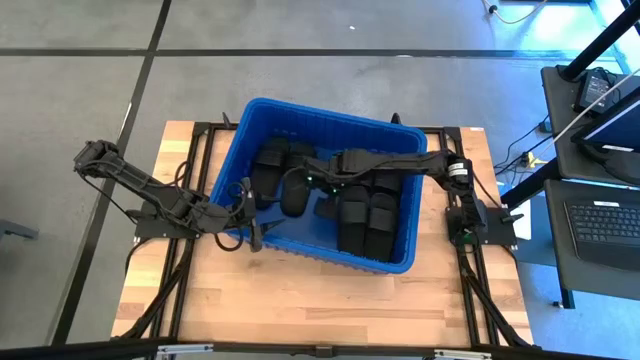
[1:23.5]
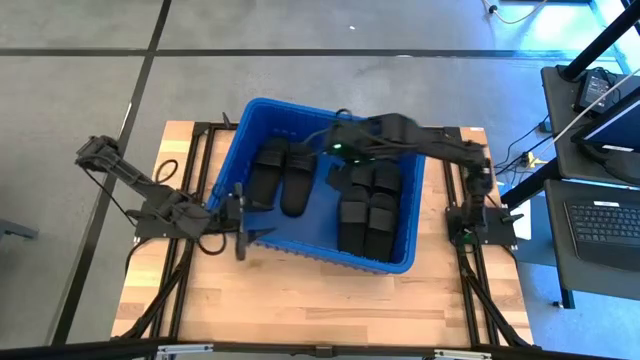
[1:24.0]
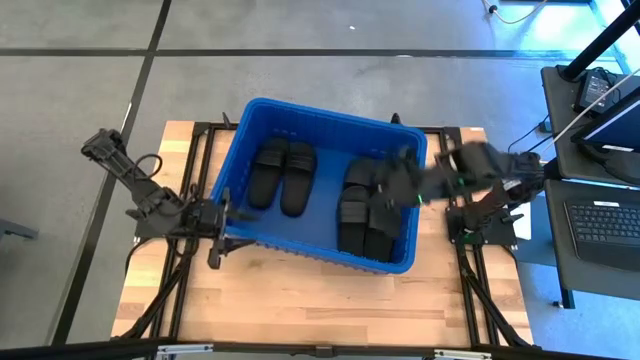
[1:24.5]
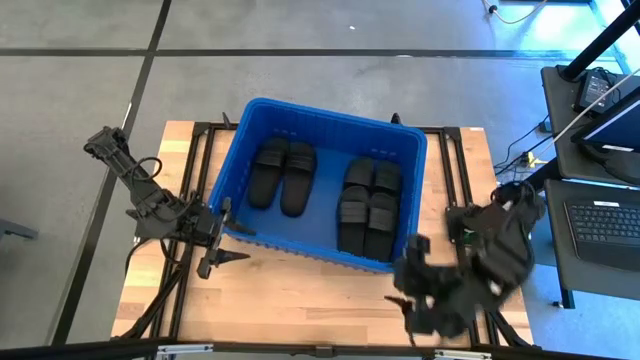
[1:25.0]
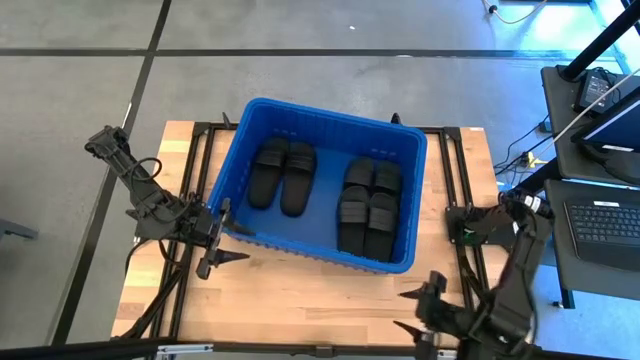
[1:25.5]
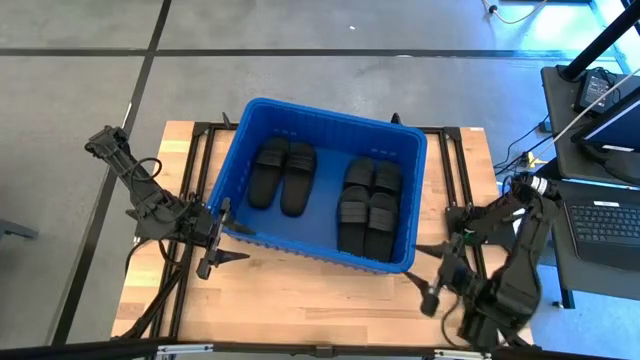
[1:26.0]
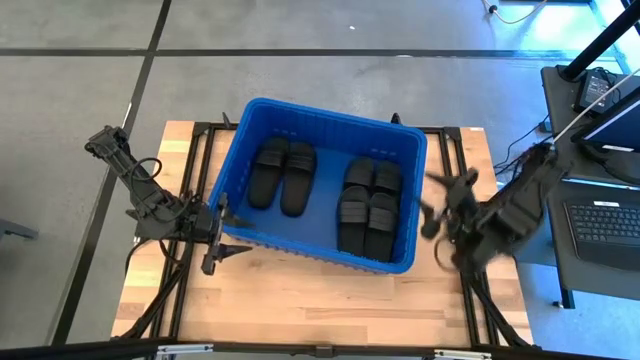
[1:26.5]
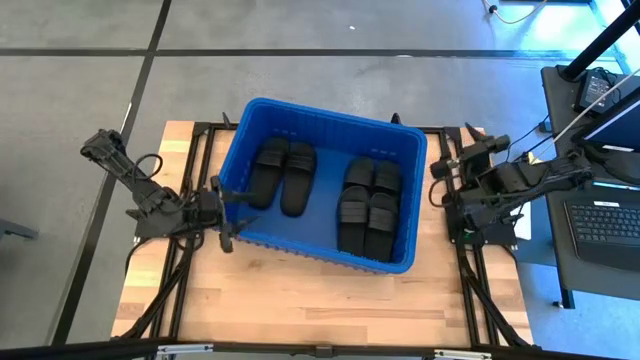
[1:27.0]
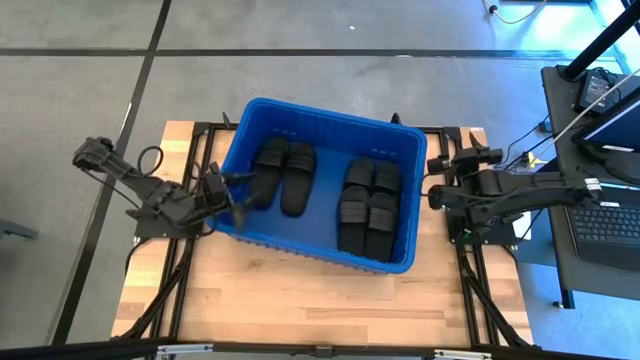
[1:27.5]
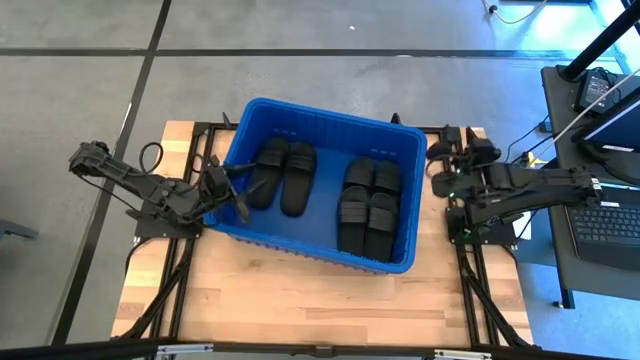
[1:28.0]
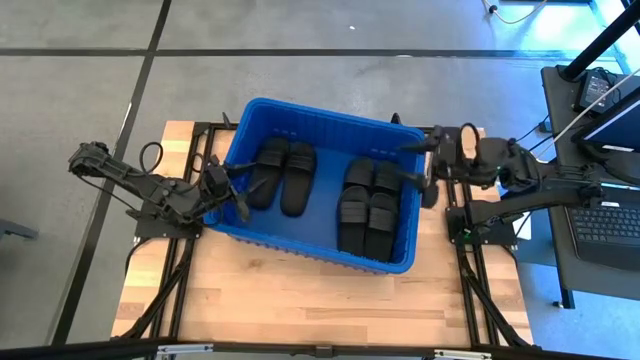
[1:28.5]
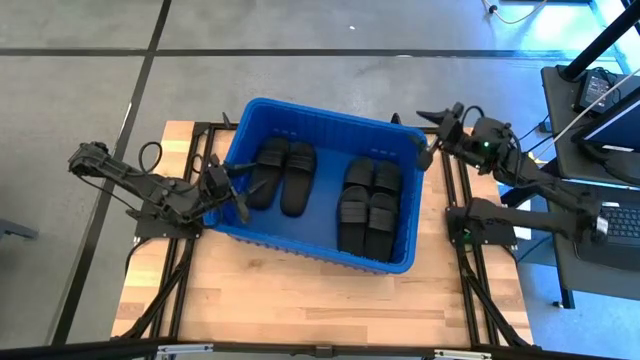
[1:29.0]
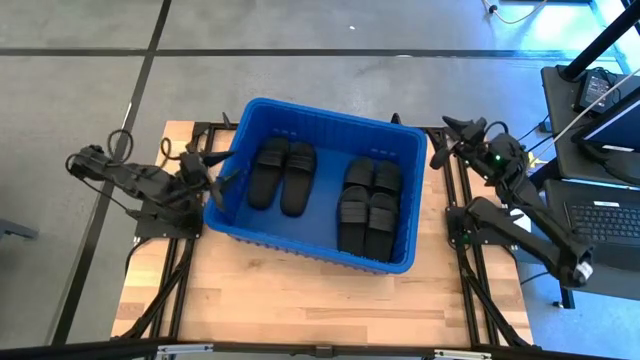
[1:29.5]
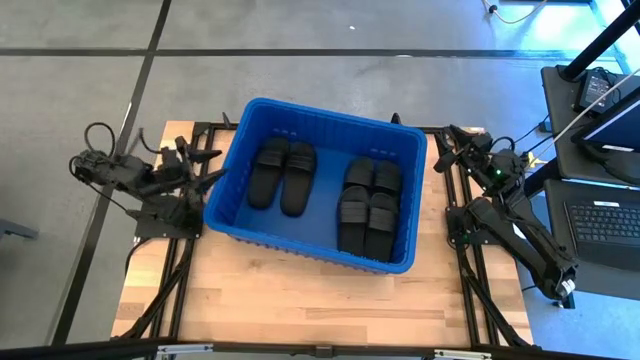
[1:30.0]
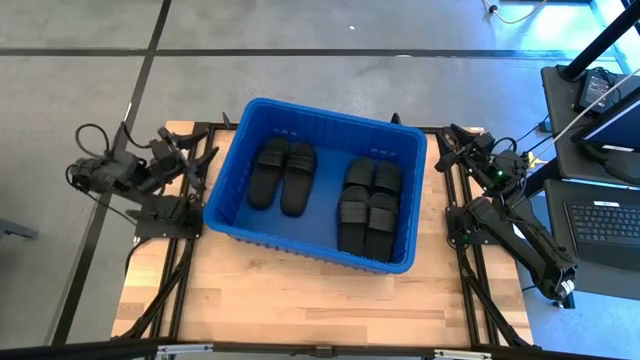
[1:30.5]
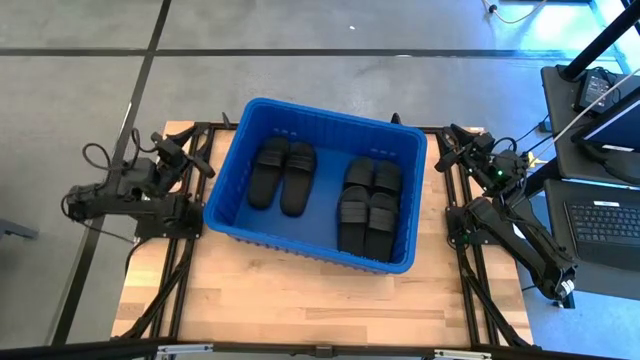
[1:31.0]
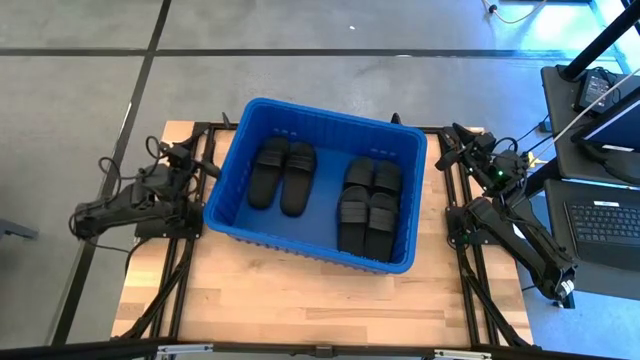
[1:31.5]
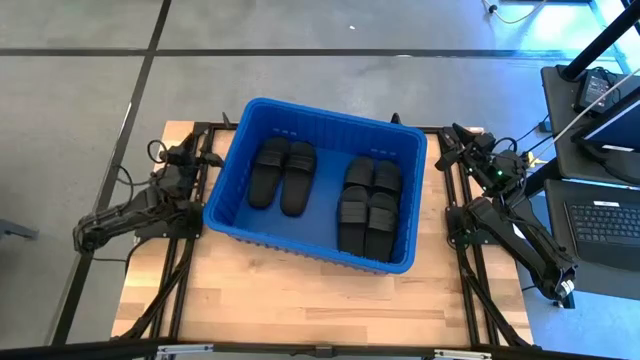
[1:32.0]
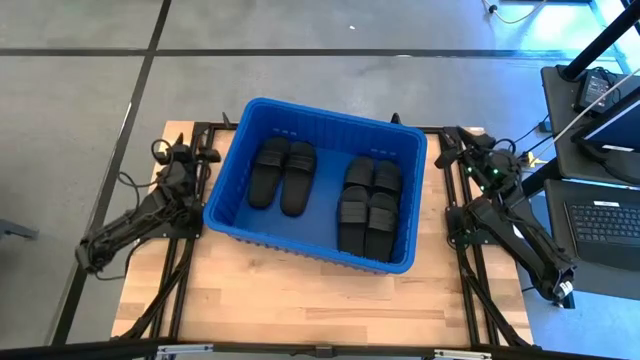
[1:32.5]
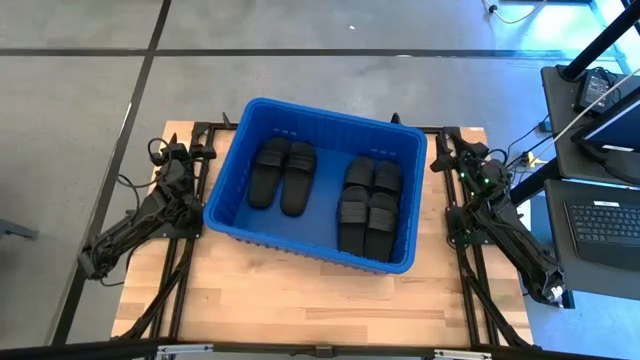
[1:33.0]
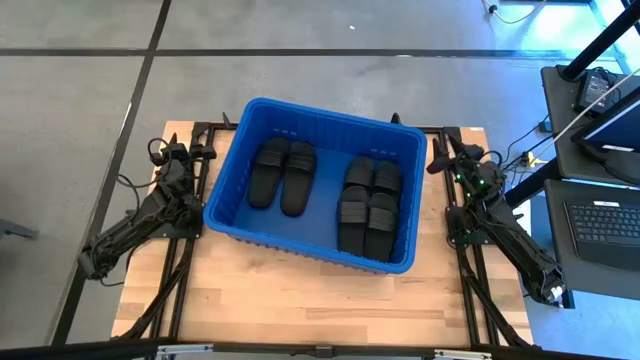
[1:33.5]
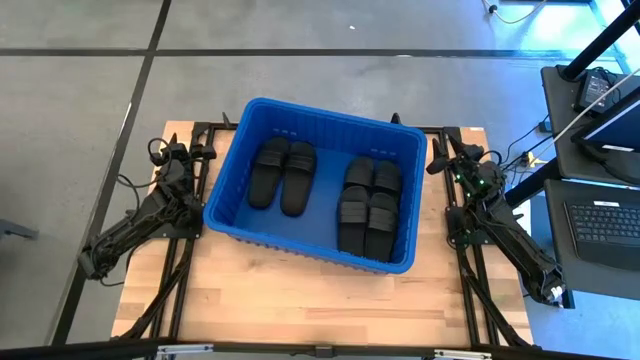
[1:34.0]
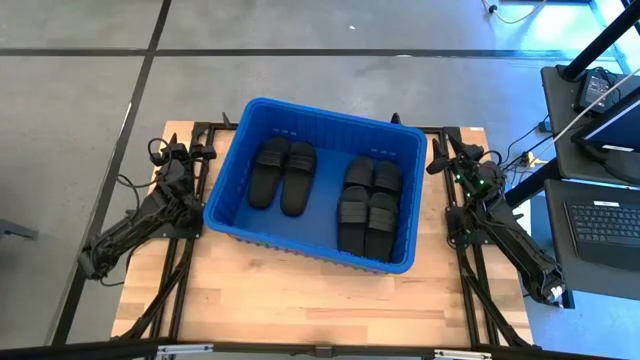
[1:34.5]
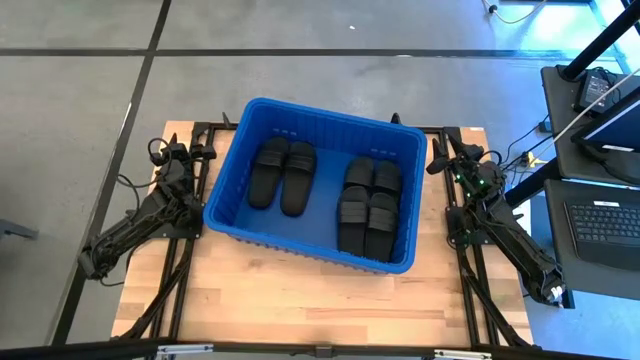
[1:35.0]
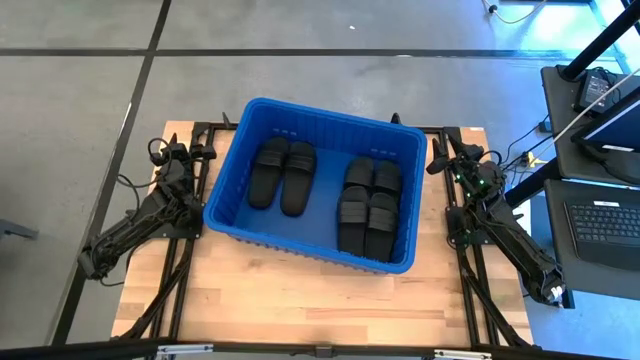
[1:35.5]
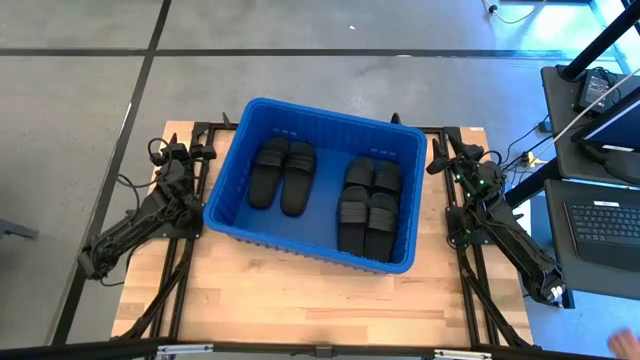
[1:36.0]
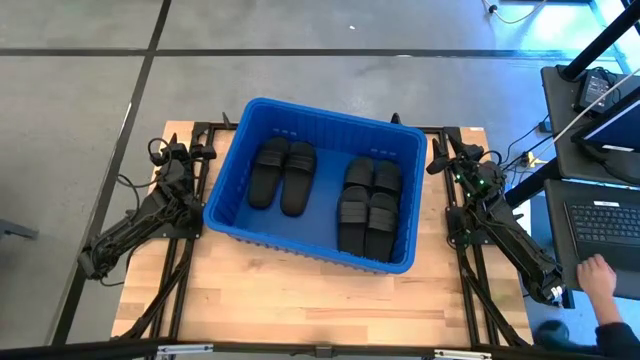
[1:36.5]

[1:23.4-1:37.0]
Task: Pick and place slides into bin
Return to Home Position

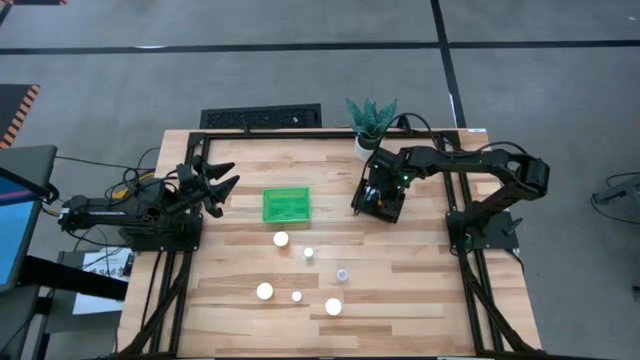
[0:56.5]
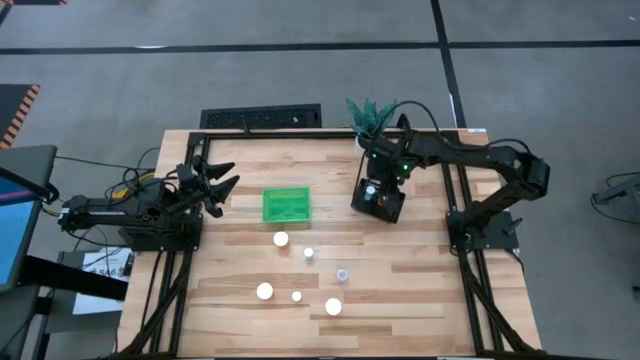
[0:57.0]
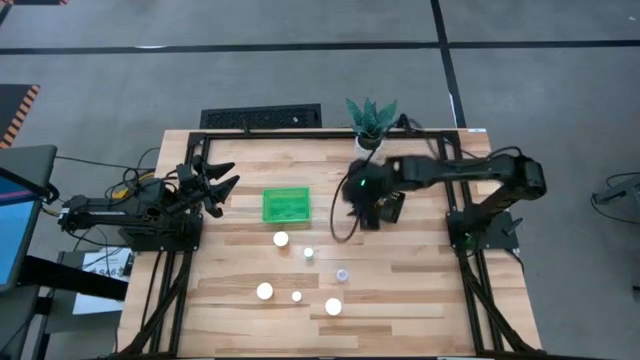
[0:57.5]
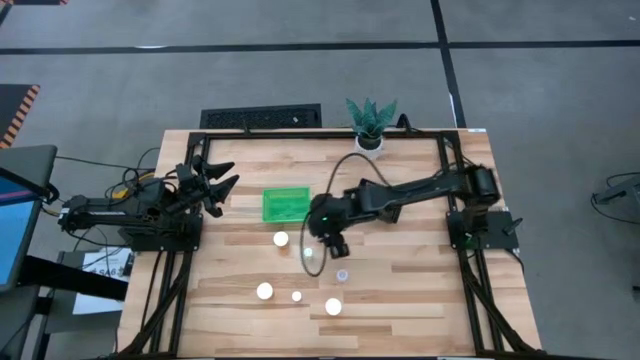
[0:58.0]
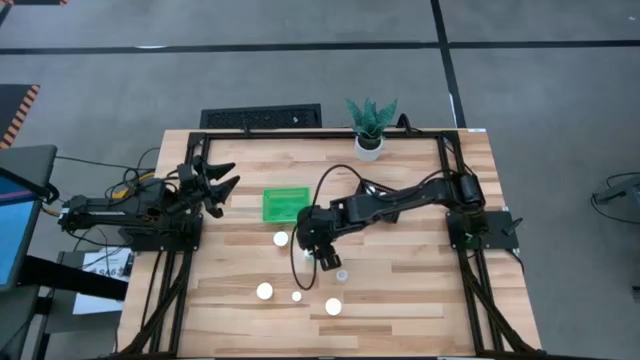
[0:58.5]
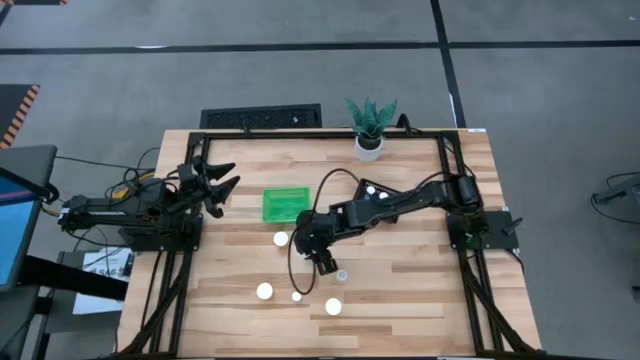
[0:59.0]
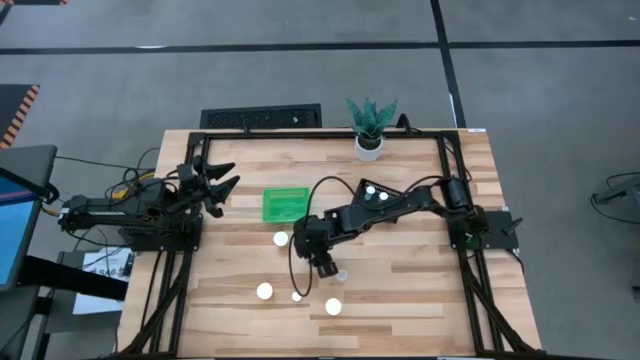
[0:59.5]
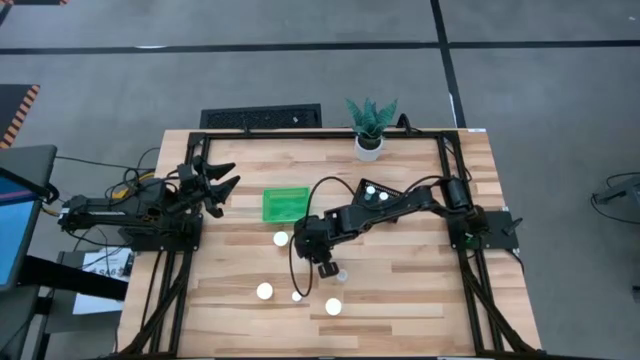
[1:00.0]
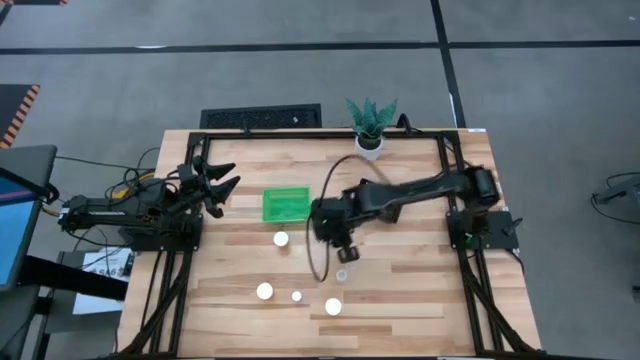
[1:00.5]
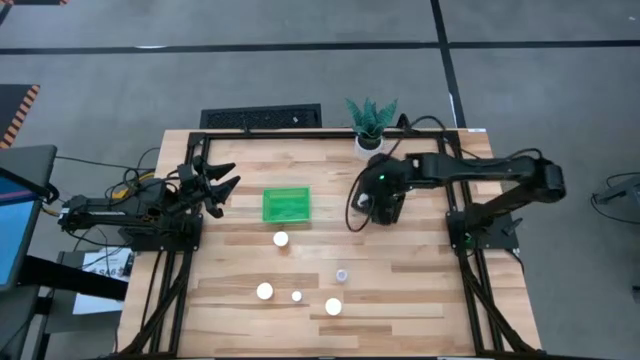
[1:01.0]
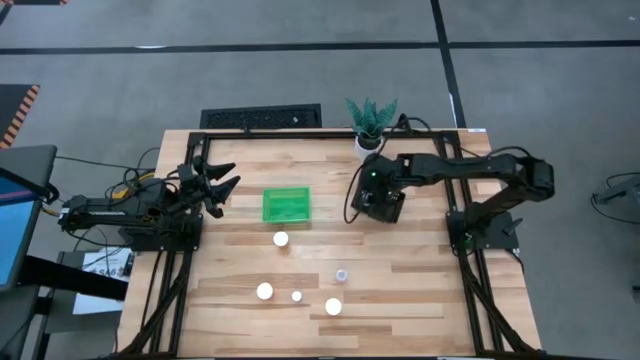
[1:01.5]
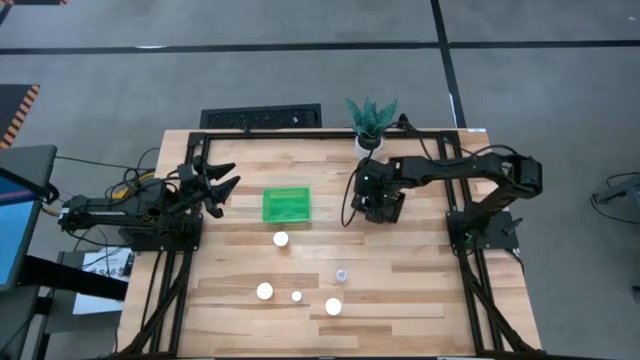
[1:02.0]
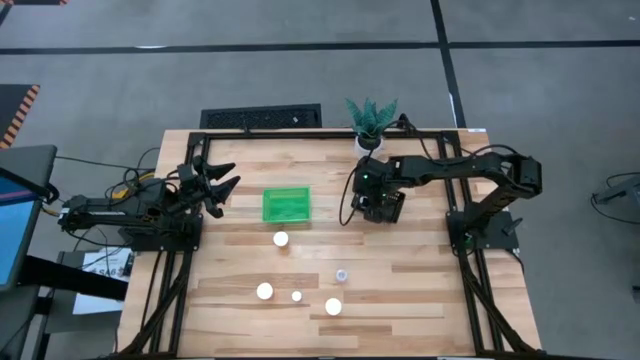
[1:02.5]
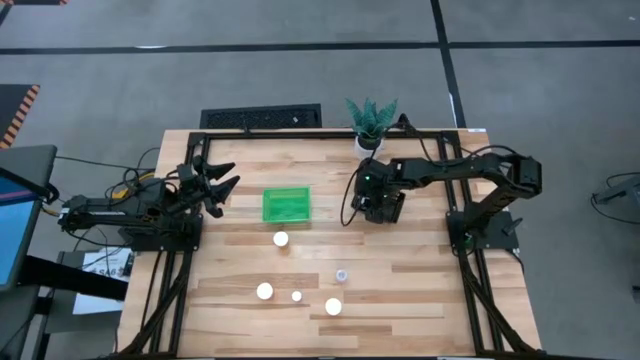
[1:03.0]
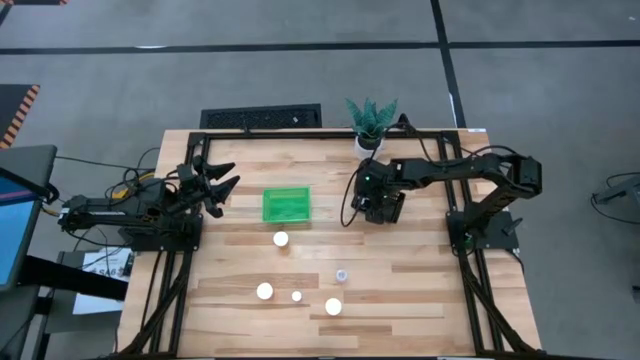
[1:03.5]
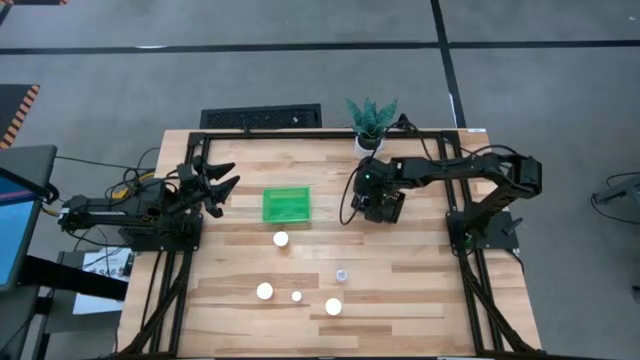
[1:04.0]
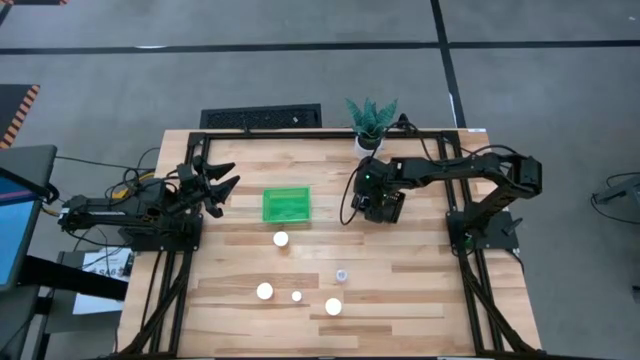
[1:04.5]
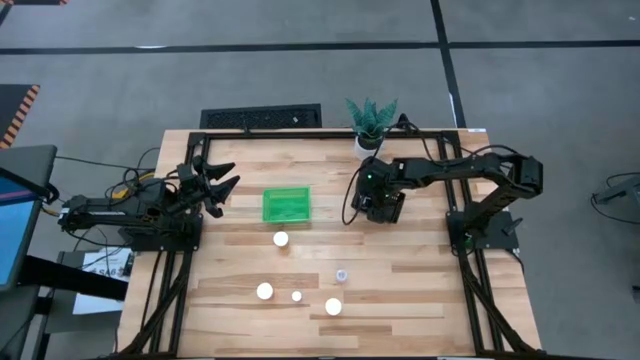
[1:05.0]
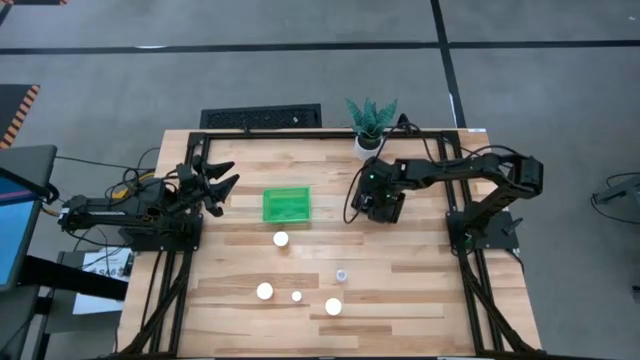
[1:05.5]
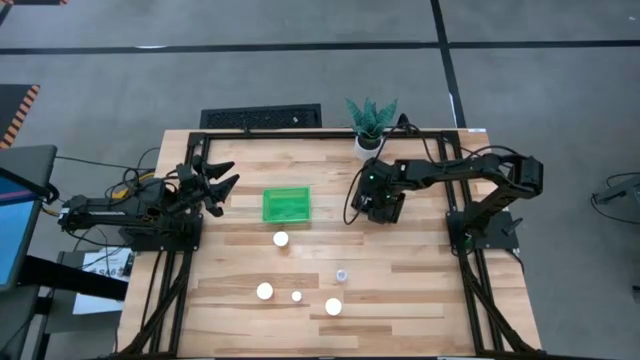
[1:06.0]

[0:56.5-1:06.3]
Task: Pick and place medicine bottles into bin by pill shape (circle, oval)
Put the blue tablet bottle into the black basket
